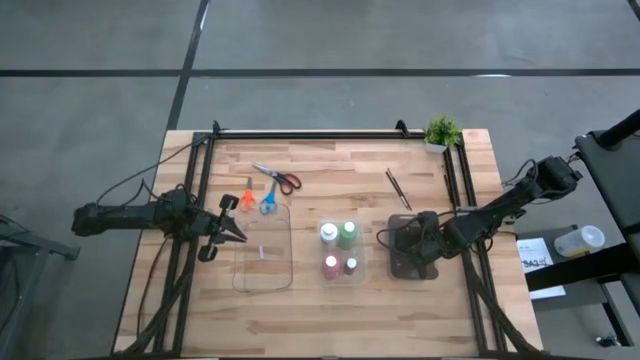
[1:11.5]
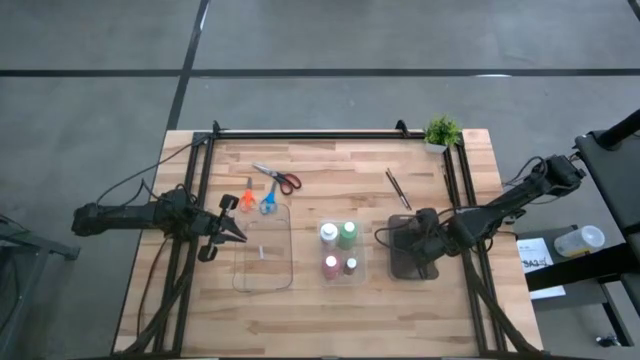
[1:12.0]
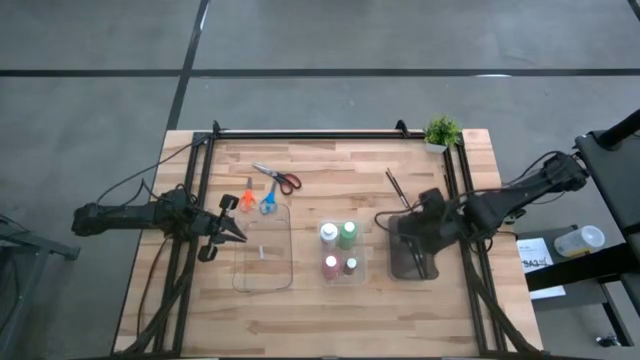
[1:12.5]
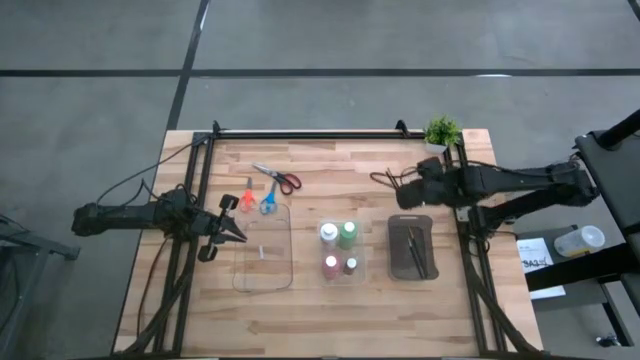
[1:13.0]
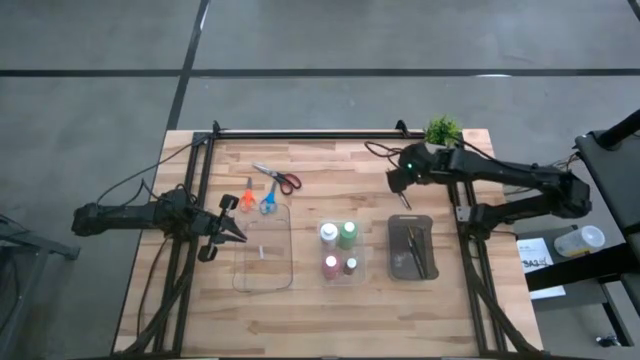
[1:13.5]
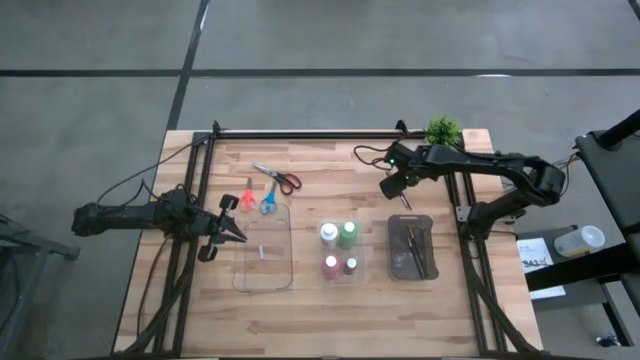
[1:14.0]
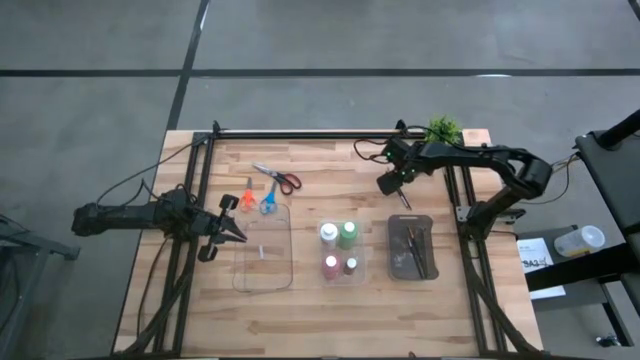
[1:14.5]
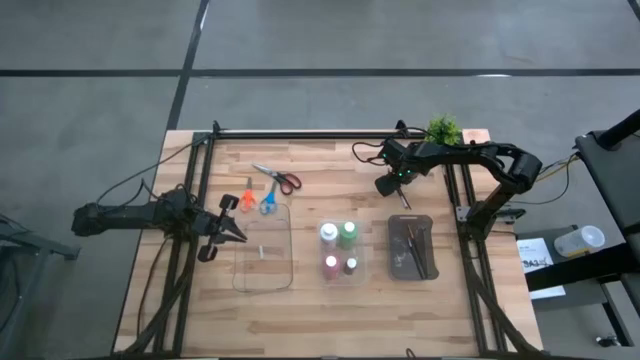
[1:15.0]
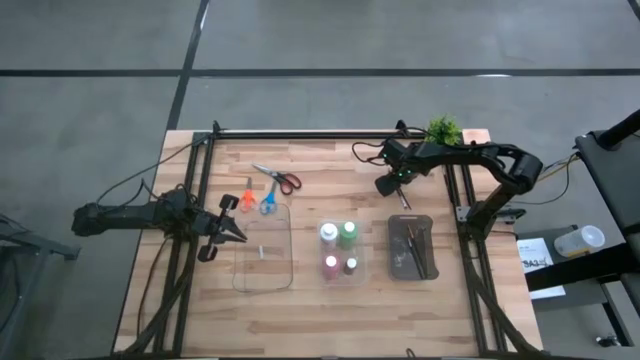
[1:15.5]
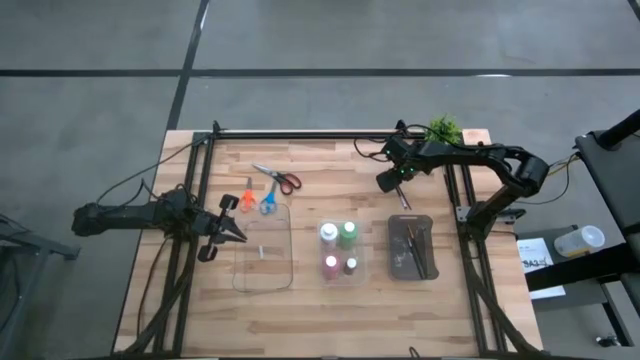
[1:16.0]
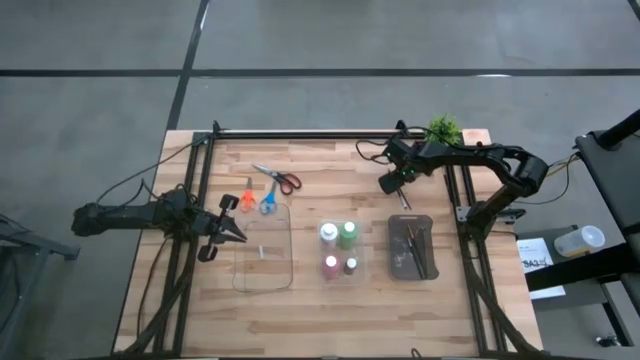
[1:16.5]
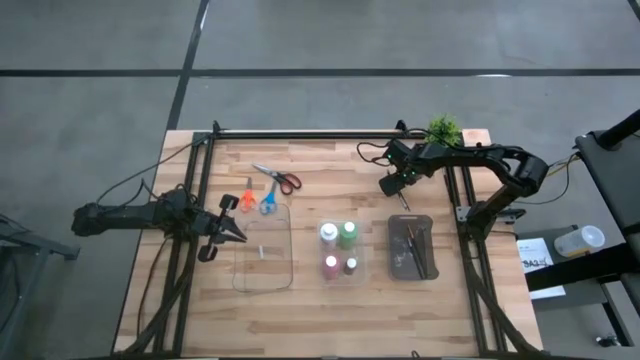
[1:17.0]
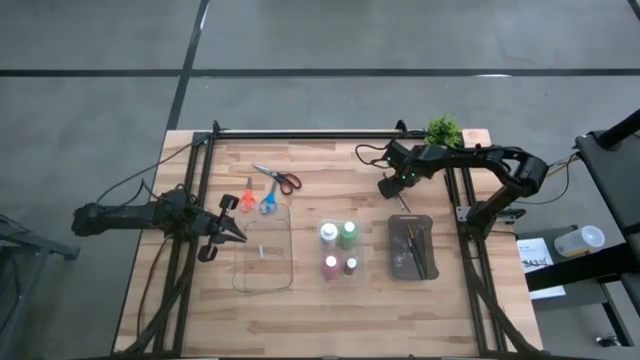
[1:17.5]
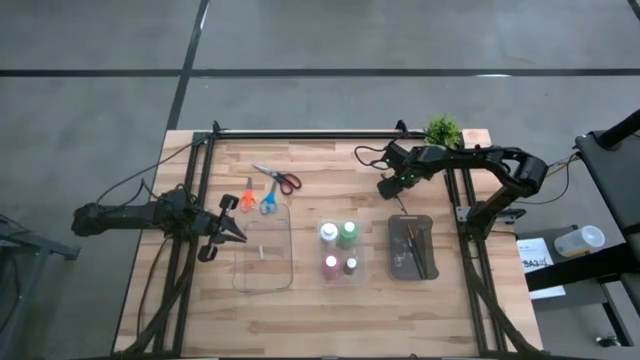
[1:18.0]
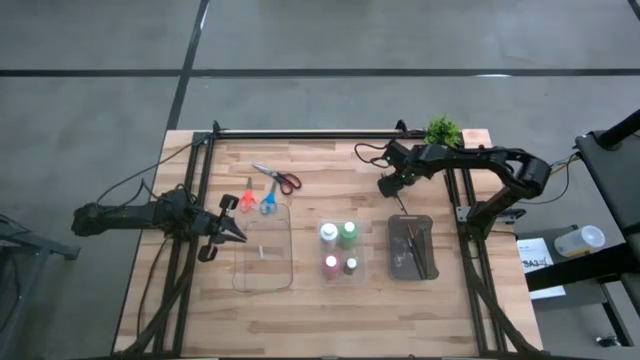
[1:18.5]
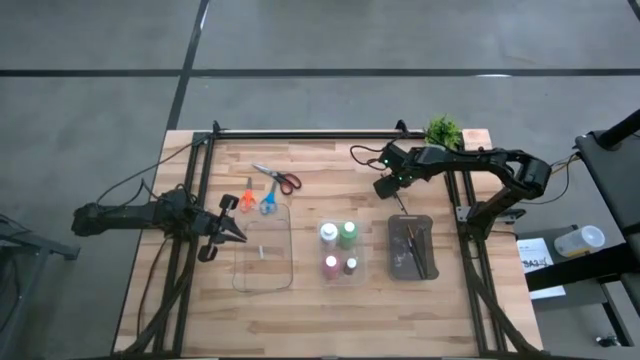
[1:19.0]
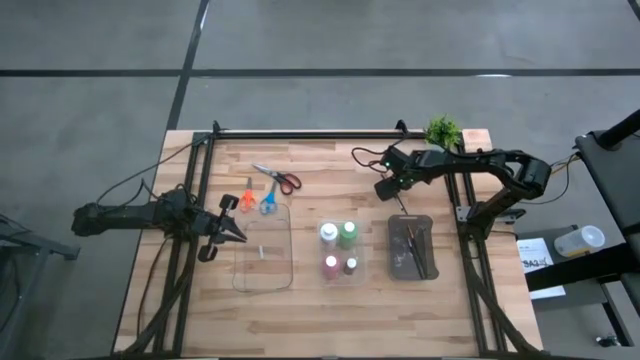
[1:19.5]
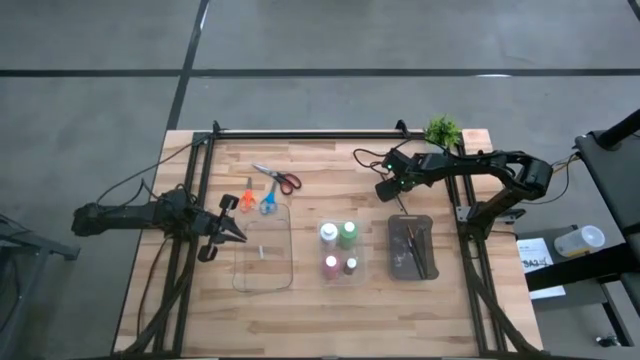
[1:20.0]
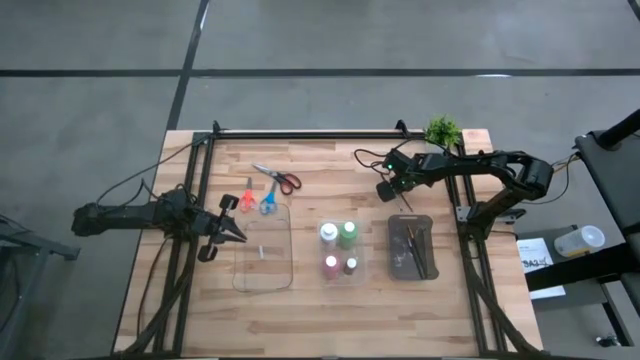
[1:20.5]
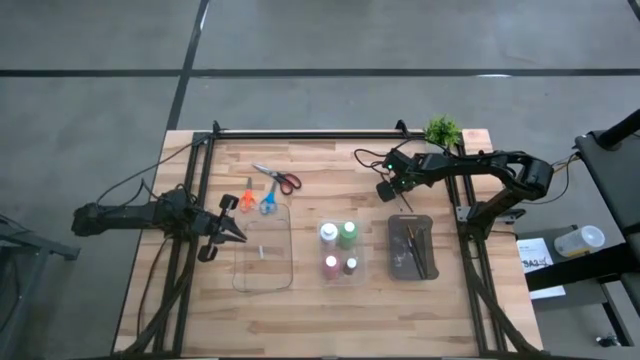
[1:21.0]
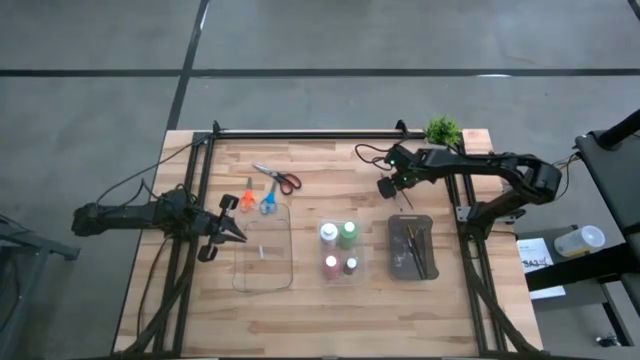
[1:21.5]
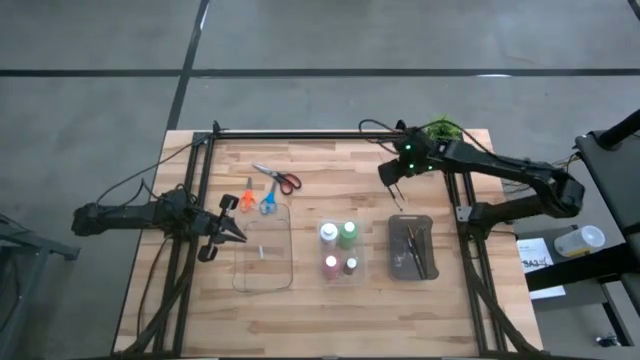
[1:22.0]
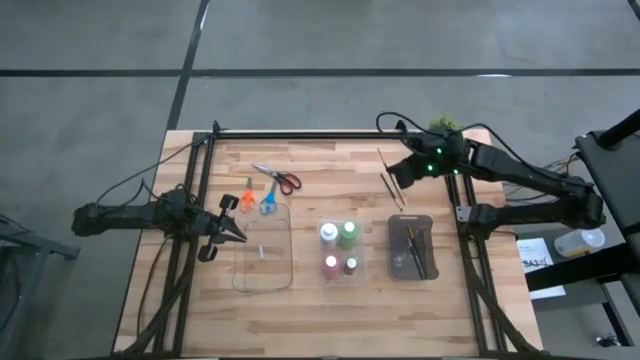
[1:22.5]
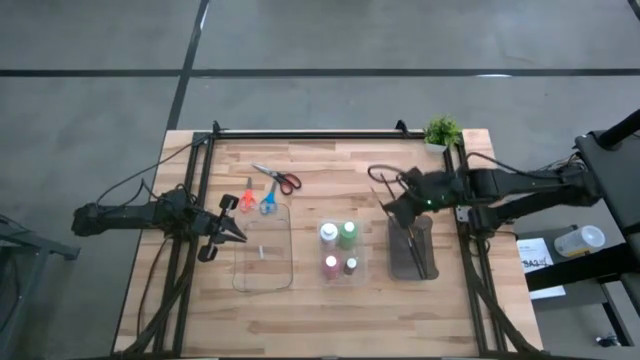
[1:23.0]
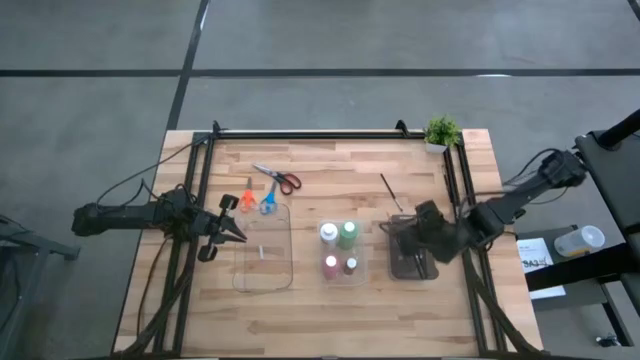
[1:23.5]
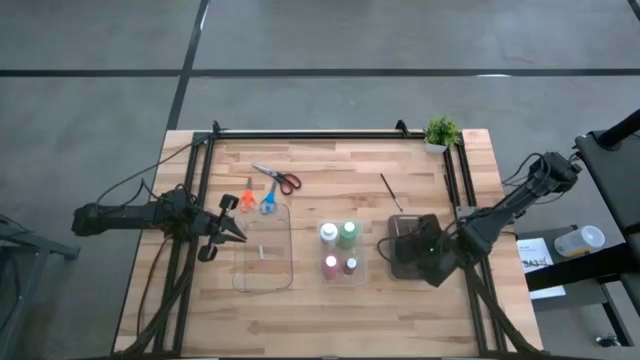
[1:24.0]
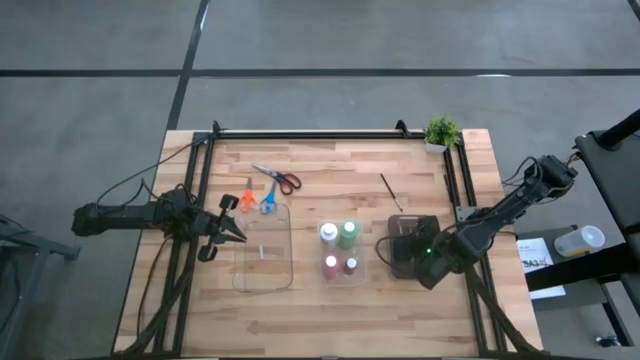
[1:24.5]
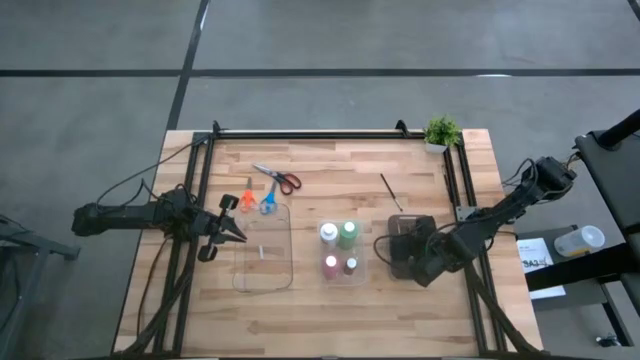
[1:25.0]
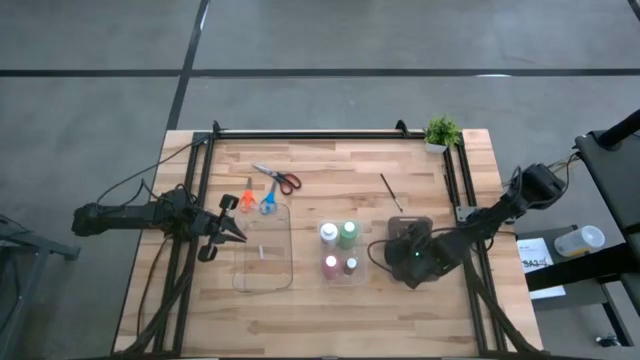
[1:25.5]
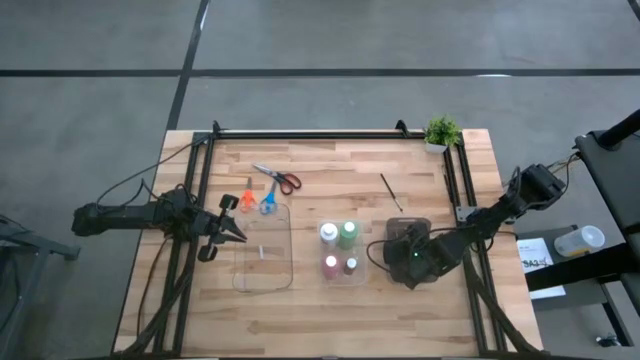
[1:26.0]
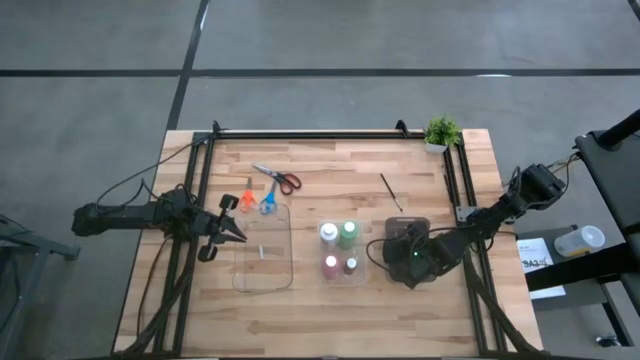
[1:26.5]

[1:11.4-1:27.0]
Task: Pick & Place Paint Supplies
Put the gold paintbrush into the black bin

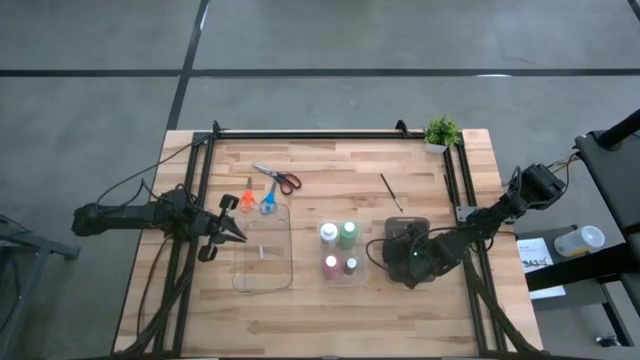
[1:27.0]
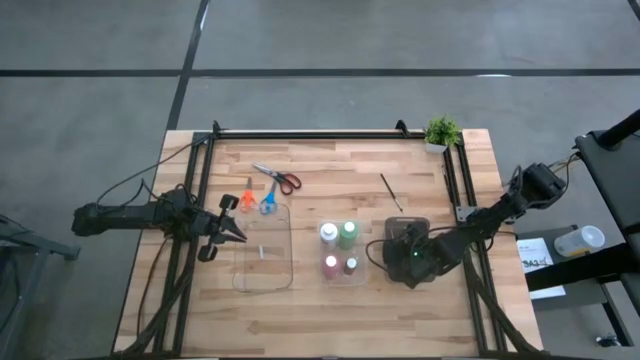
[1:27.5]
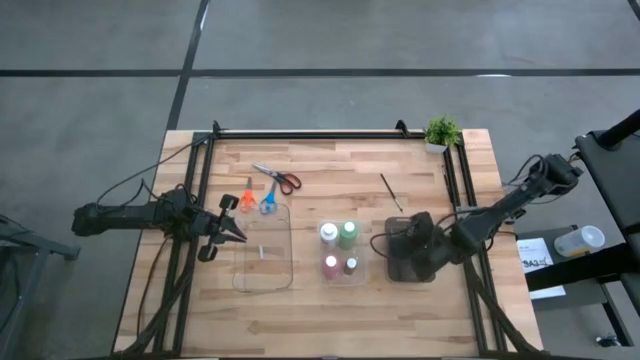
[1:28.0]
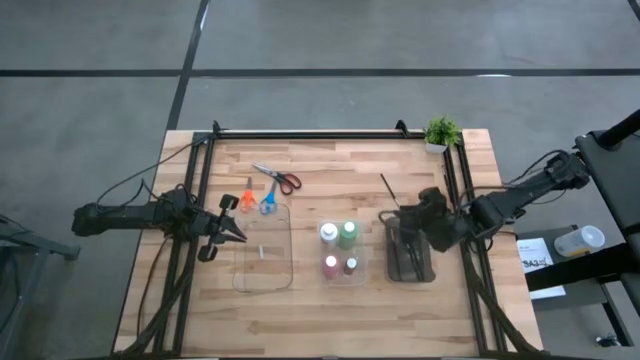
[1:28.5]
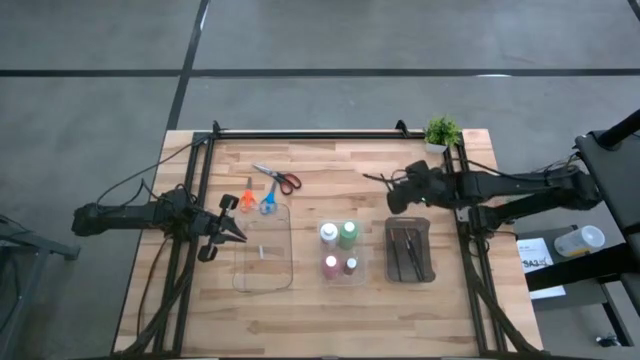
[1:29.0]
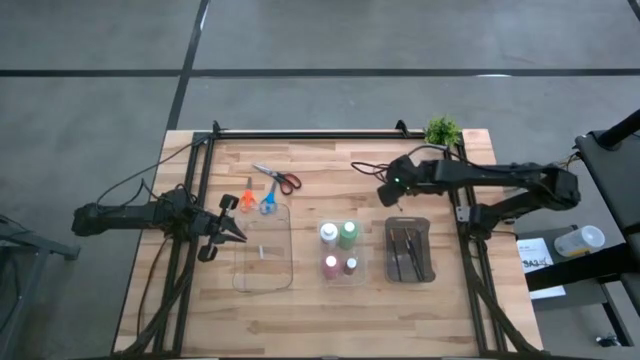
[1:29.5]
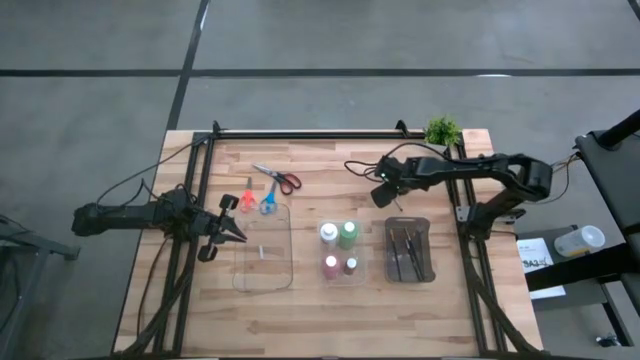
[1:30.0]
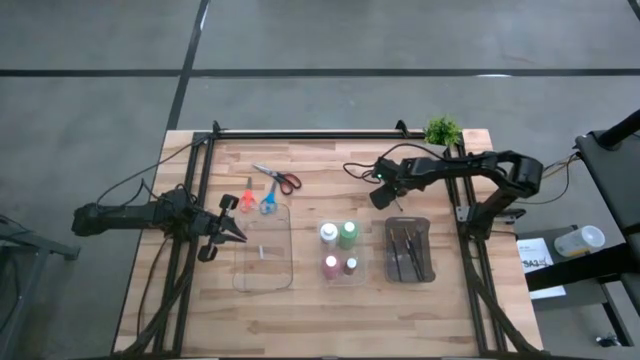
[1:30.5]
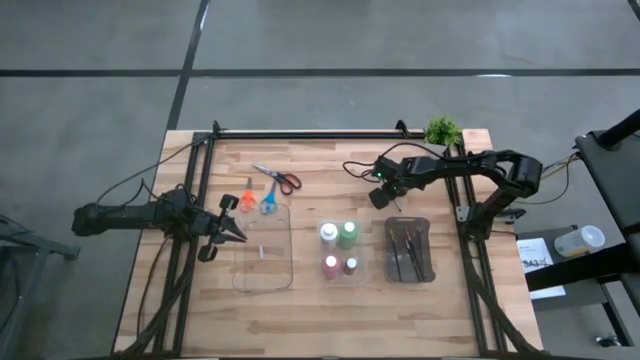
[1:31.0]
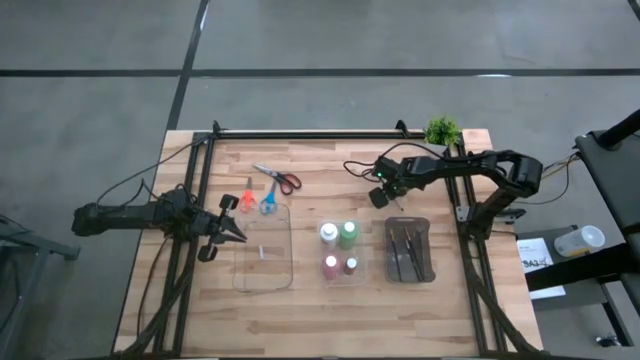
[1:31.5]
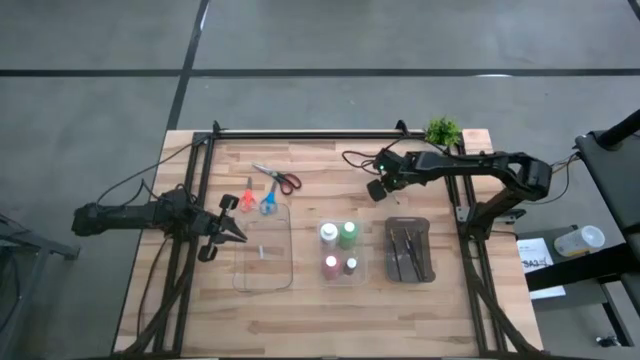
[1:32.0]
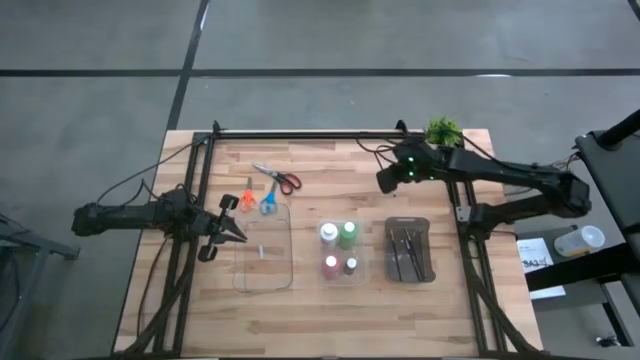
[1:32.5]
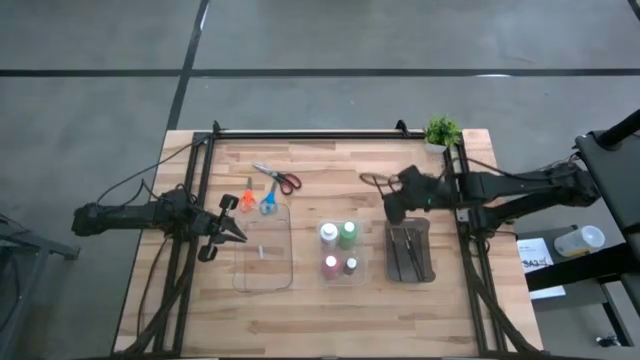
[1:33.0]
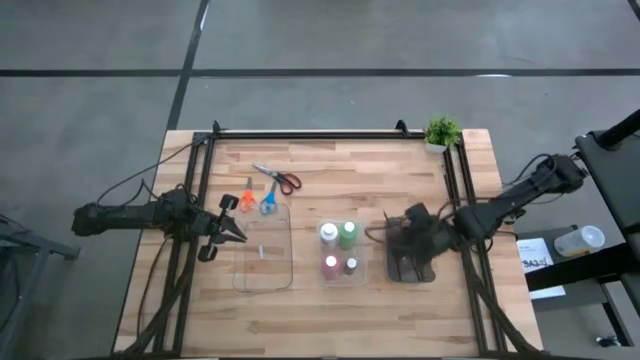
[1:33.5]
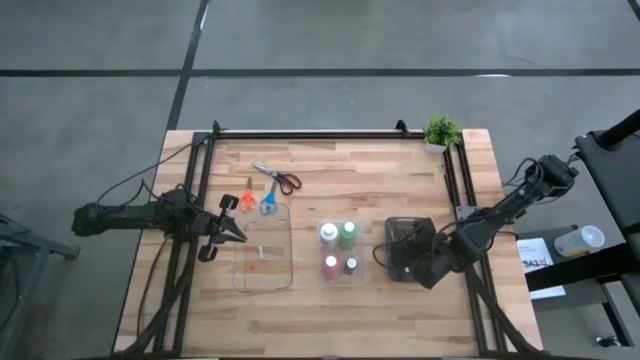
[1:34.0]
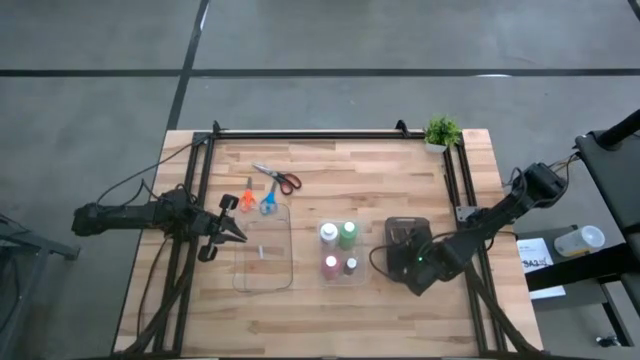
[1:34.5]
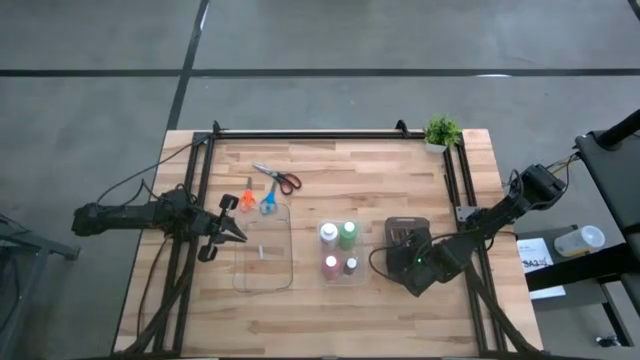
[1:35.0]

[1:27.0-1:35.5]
Put the silver paintbrush into the black bin
